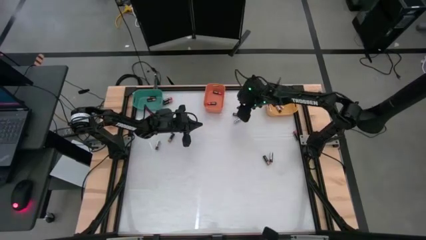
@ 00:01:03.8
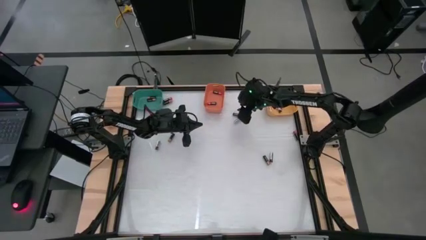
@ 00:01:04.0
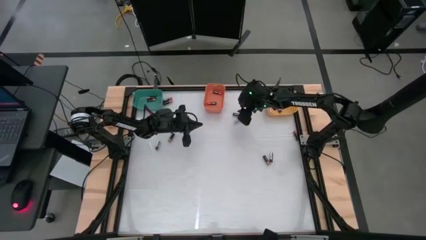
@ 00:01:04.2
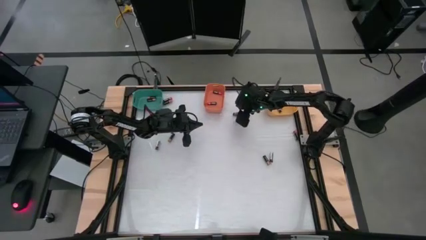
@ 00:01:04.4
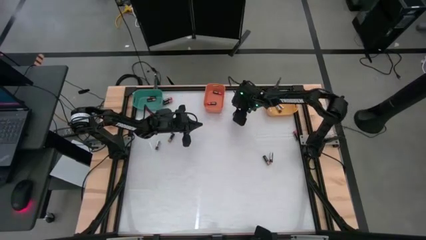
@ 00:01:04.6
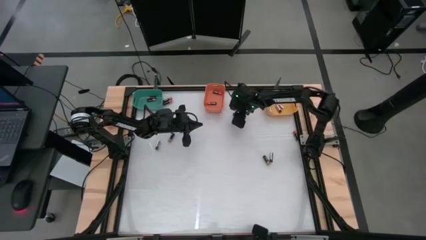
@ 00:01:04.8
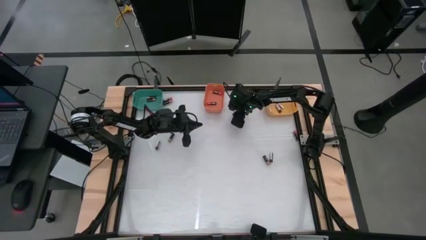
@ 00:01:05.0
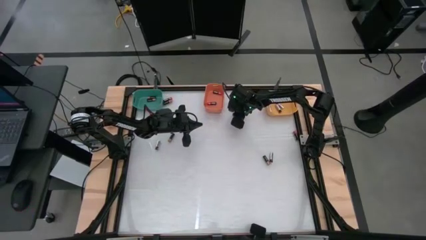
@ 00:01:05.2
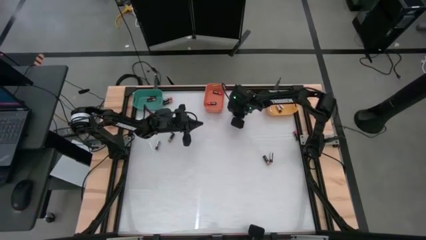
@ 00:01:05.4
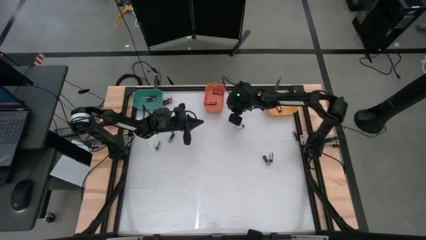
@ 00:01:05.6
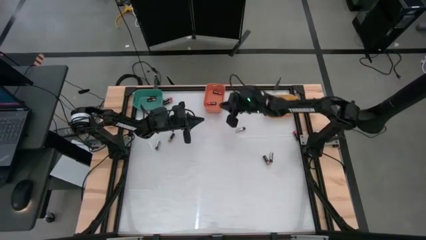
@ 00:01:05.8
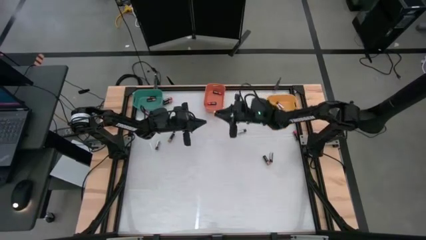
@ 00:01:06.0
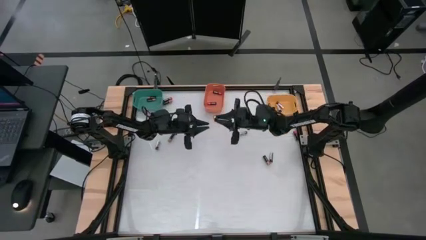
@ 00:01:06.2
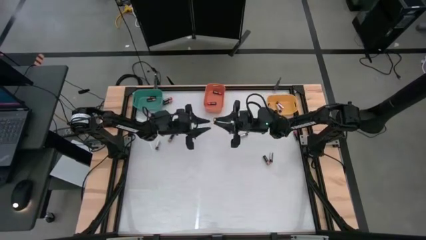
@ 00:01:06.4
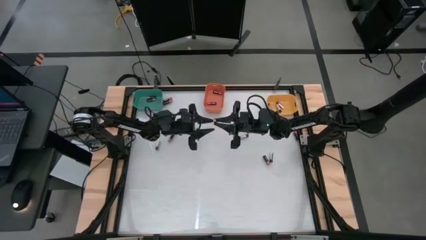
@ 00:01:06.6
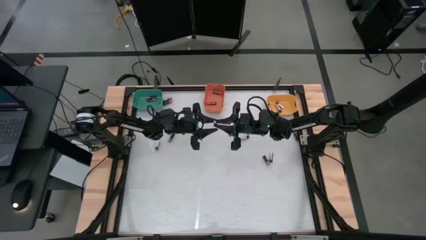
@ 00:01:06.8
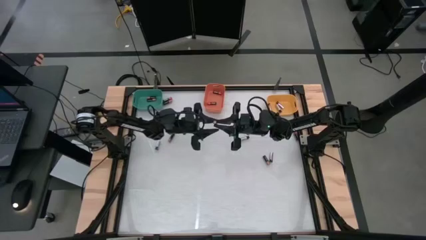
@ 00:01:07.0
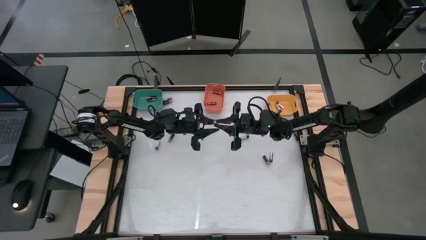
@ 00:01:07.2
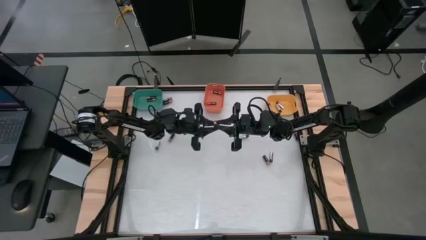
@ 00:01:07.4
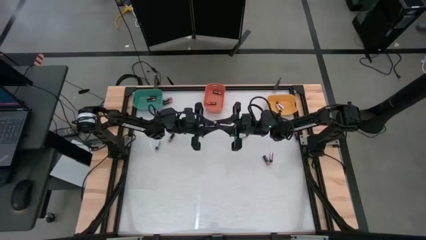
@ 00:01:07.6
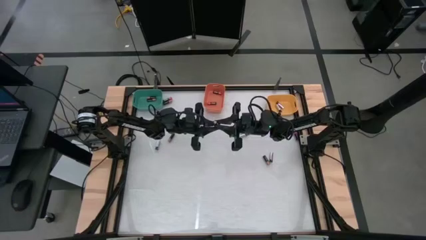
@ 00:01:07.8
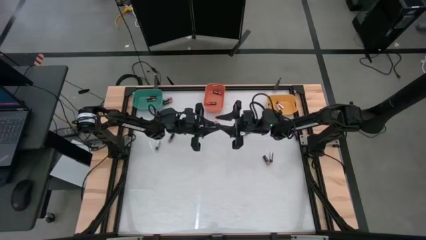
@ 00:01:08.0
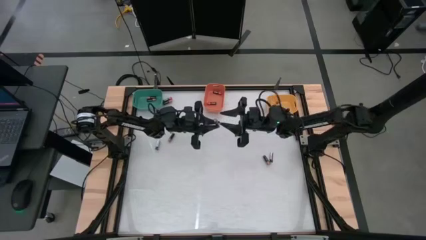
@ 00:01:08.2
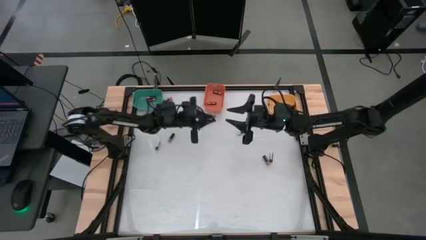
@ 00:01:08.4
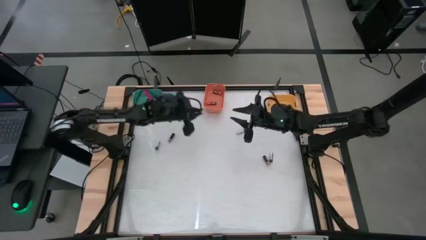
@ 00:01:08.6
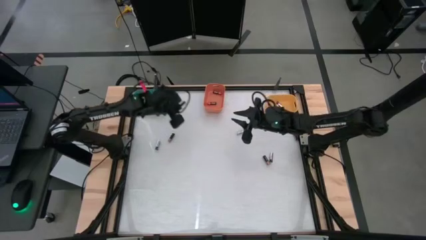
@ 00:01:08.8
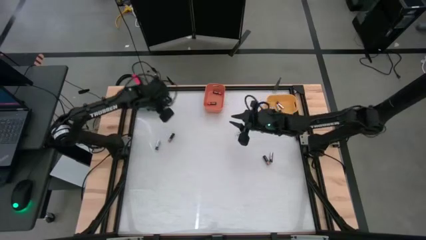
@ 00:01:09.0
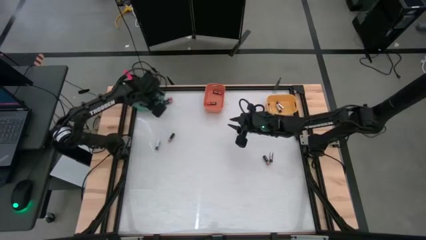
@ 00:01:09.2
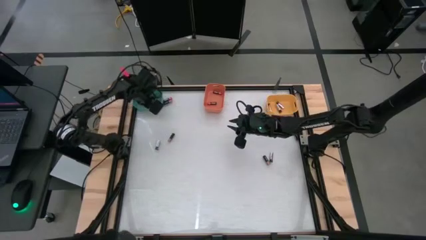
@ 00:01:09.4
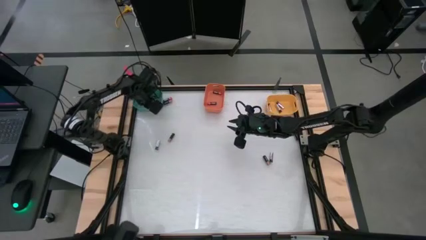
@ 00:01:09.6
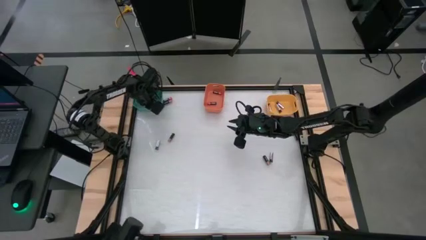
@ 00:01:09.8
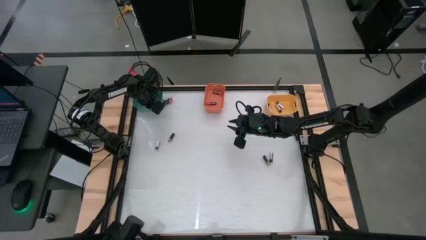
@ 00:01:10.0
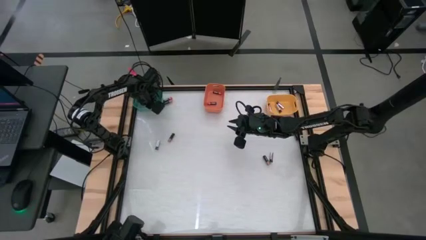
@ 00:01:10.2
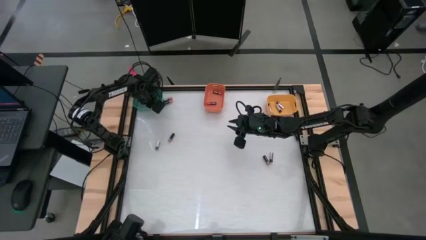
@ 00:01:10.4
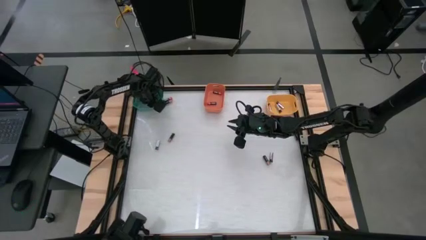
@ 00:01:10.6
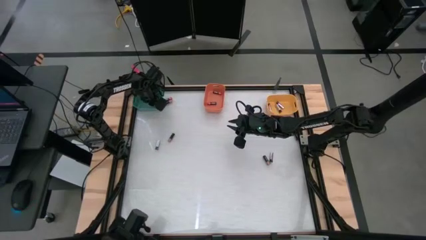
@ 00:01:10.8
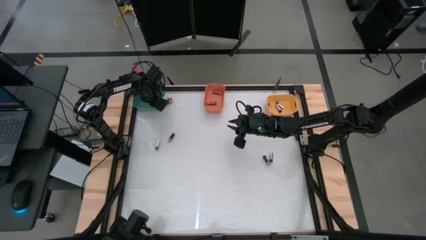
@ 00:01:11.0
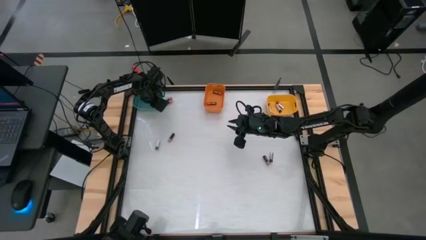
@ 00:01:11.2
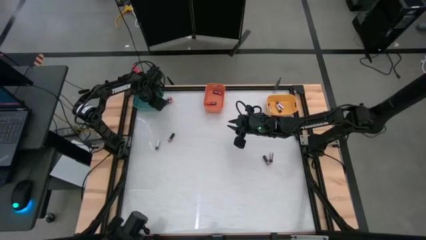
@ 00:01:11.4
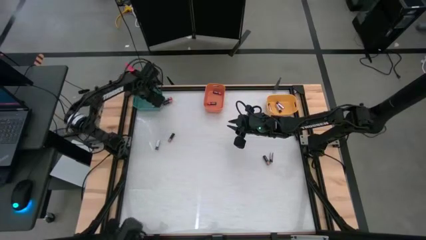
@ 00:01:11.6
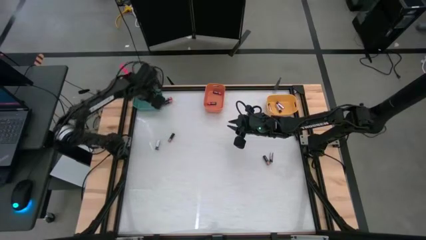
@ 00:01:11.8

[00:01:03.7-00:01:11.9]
Task: Sort batteries
Put the top right copper battery into the green container

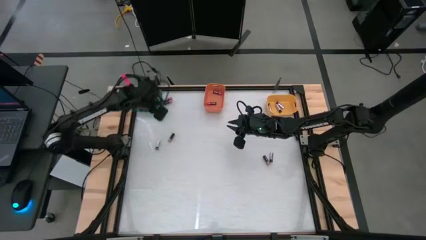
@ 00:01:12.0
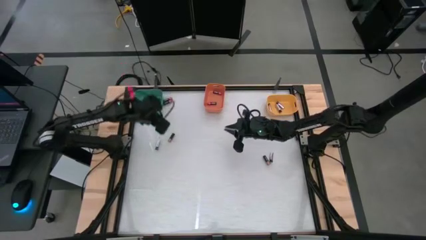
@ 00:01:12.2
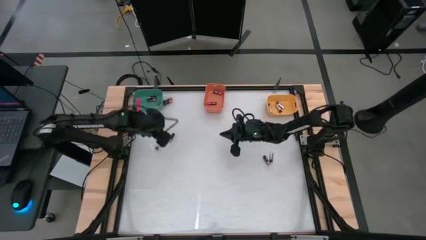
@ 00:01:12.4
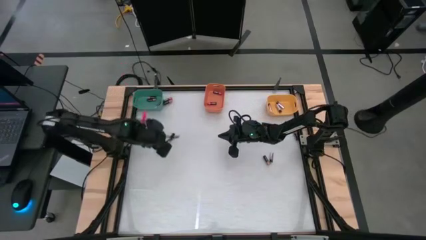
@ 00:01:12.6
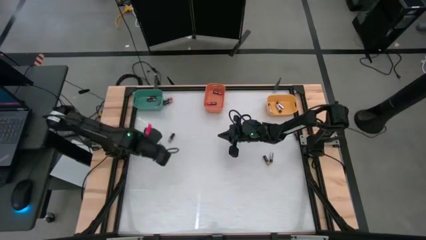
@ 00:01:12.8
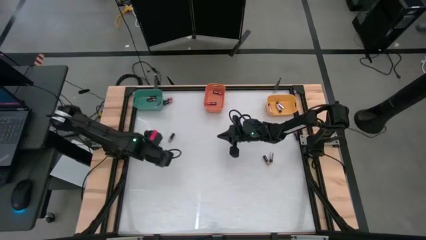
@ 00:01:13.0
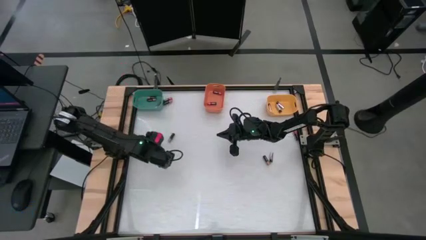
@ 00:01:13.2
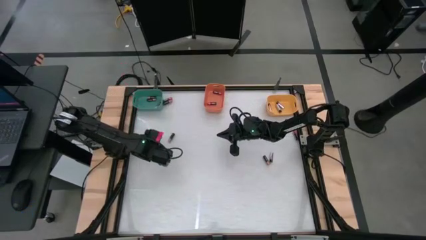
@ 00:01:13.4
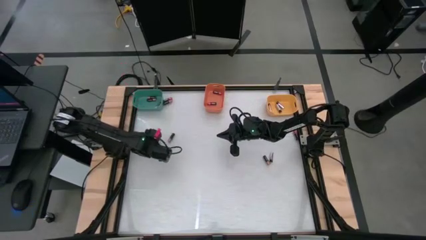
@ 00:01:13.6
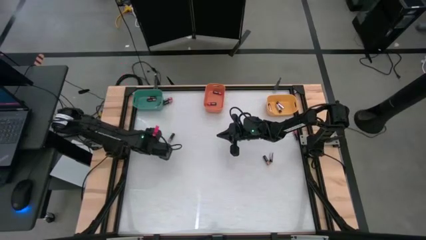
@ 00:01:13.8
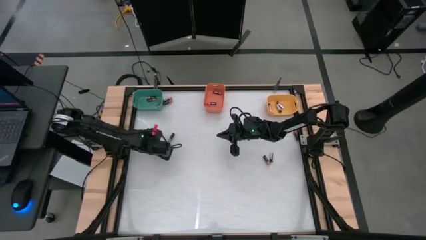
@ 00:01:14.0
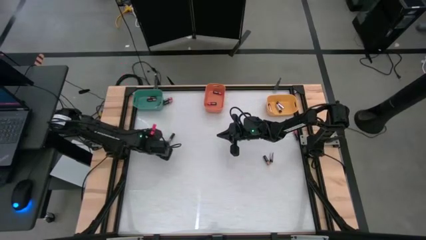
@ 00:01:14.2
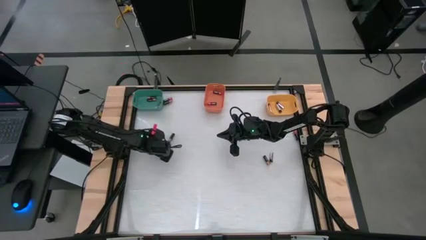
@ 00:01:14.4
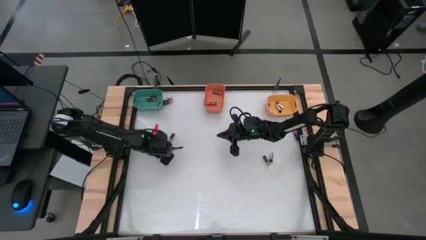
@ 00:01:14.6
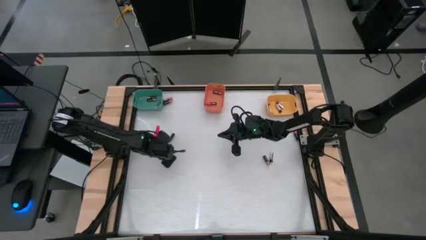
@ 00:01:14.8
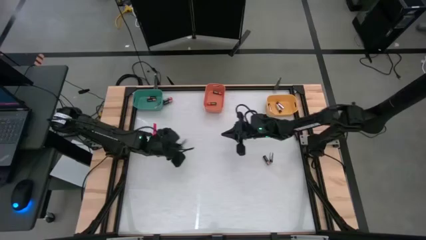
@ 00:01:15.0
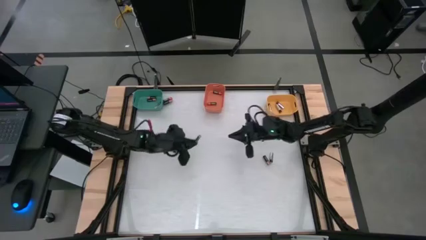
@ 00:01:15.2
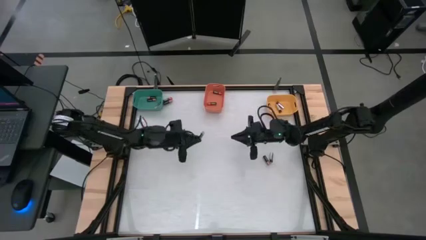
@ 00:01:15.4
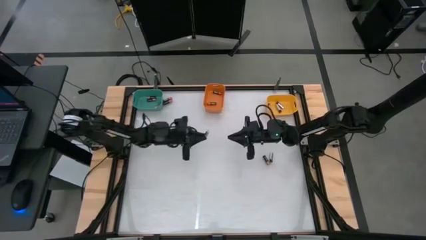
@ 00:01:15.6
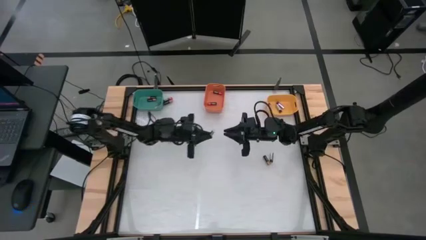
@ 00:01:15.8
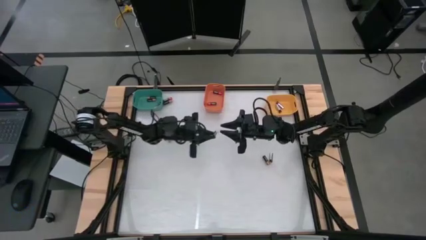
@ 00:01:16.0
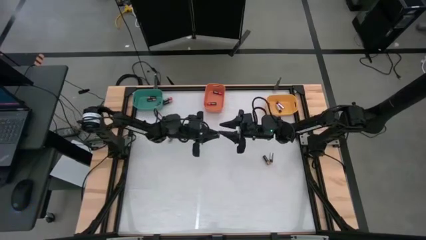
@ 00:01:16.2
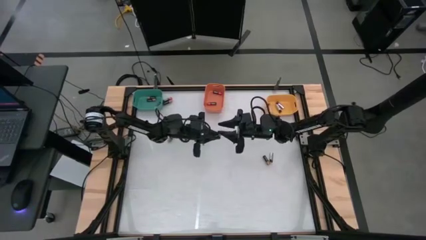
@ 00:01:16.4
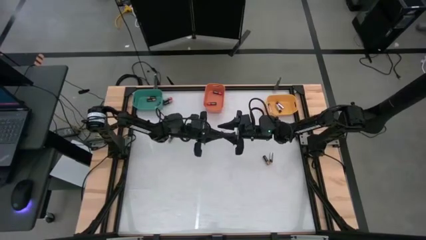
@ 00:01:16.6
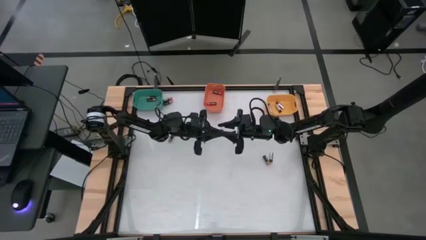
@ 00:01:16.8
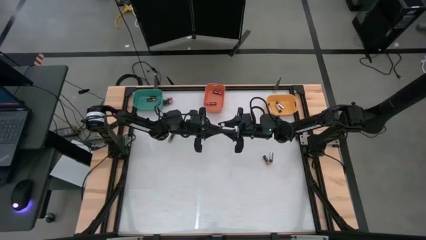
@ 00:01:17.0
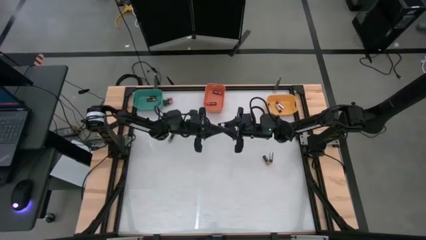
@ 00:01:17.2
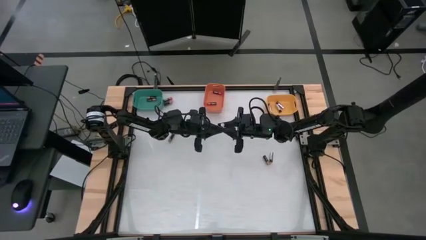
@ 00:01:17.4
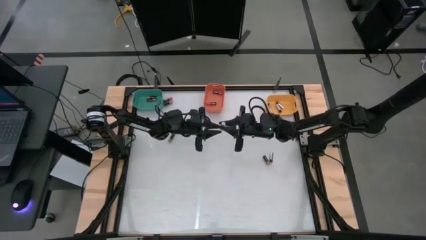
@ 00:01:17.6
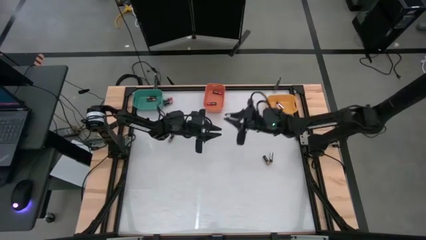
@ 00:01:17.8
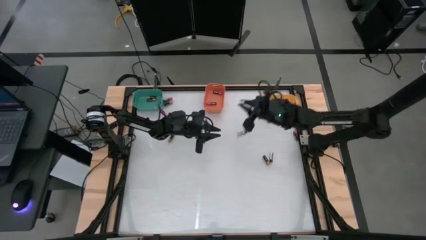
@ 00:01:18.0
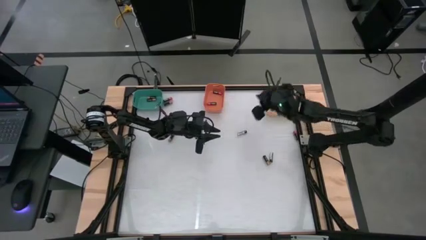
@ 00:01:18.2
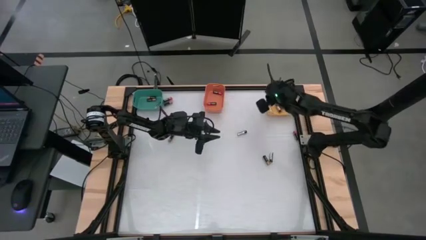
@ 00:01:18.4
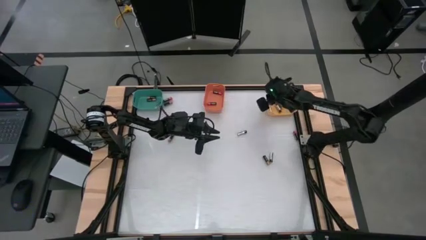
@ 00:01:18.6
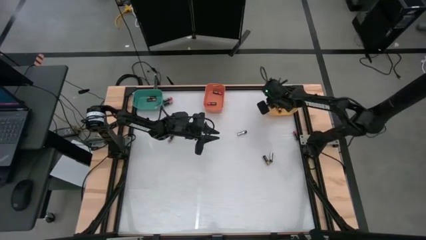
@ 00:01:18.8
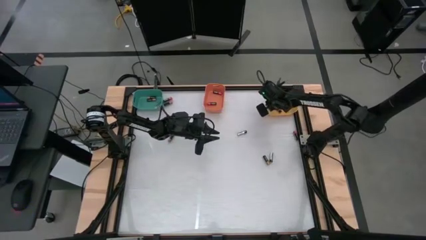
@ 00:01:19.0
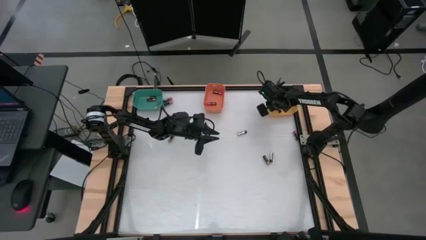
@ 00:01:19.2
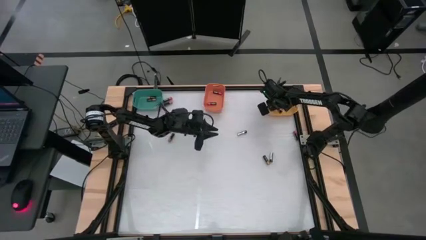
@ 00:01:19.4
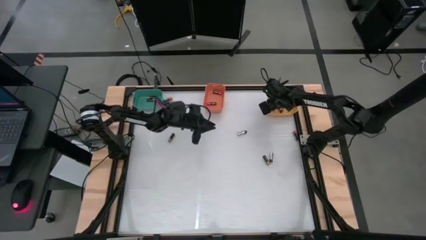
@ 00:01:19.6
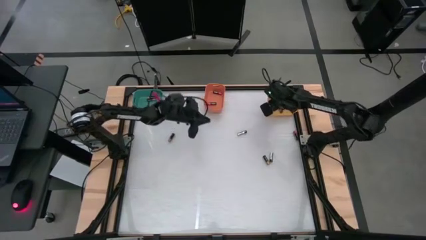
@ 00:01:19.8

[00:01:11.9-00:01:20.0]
Put the bottom left silver battery into the yellow container
